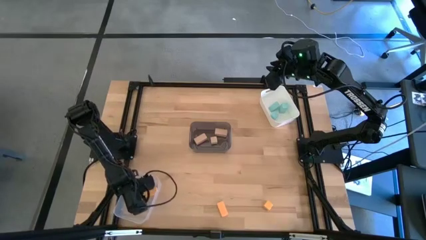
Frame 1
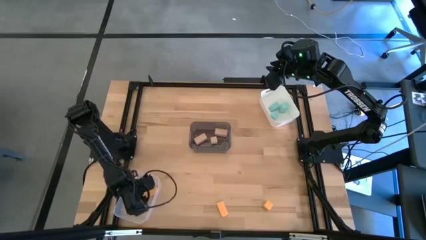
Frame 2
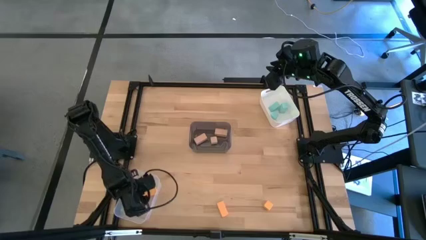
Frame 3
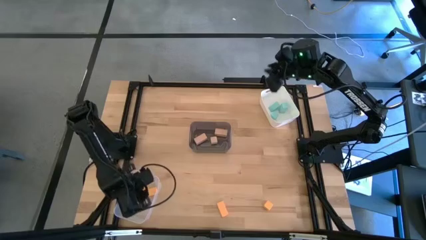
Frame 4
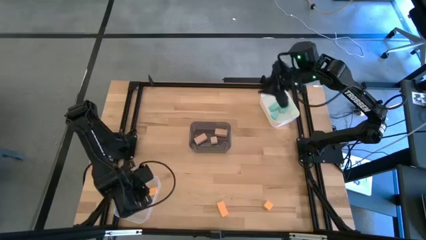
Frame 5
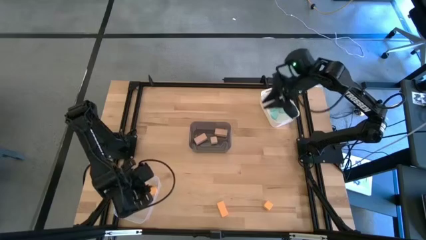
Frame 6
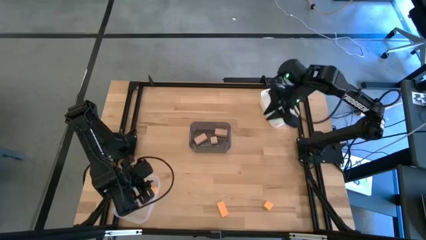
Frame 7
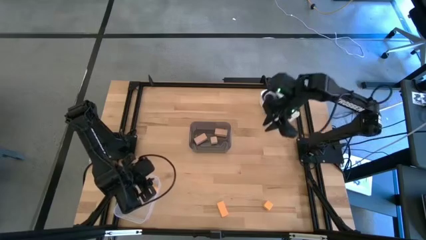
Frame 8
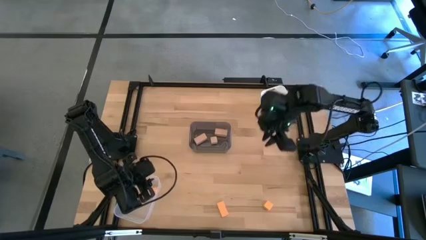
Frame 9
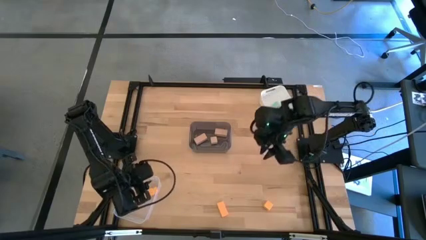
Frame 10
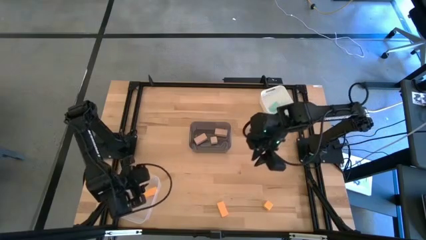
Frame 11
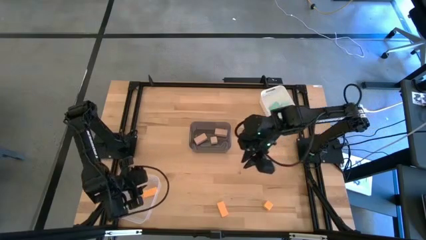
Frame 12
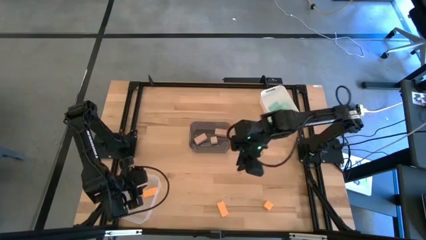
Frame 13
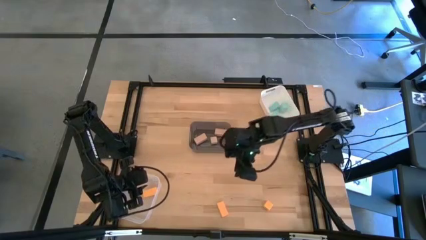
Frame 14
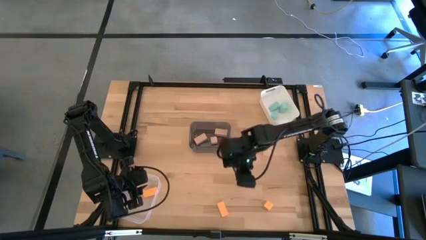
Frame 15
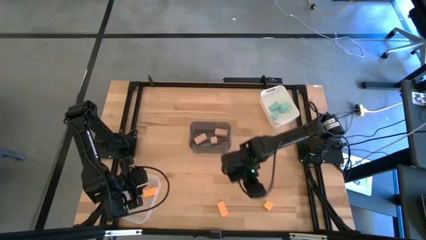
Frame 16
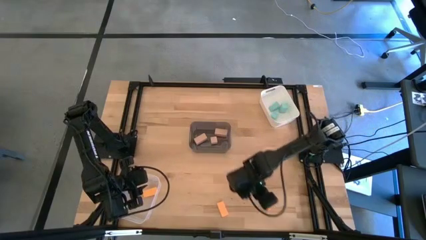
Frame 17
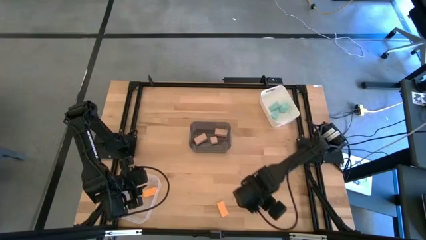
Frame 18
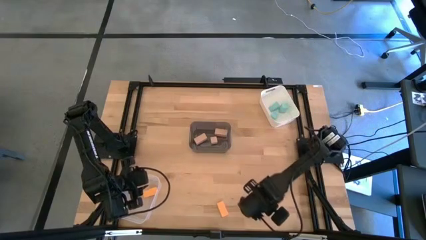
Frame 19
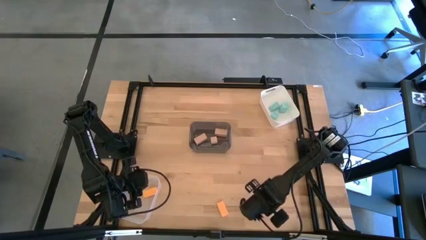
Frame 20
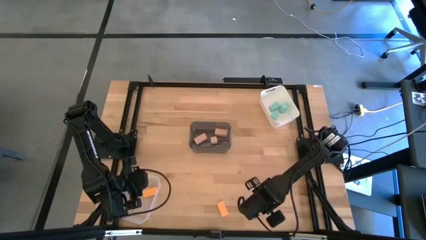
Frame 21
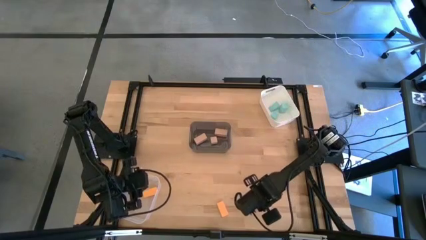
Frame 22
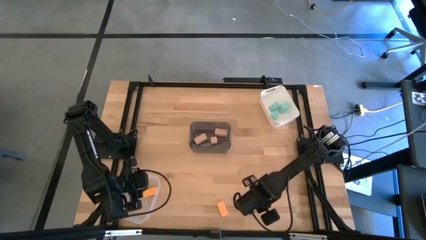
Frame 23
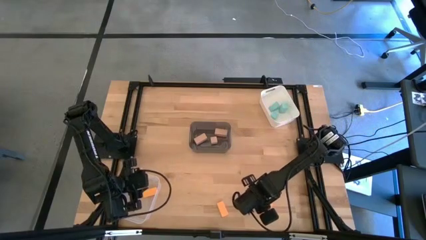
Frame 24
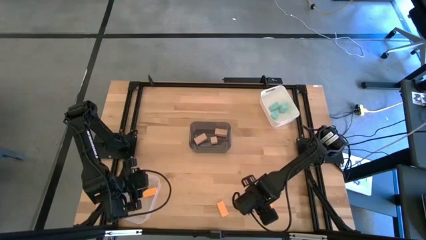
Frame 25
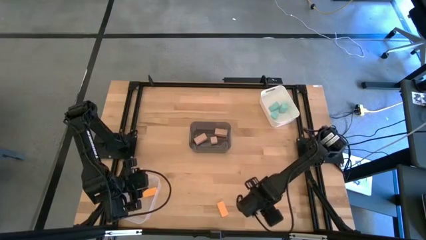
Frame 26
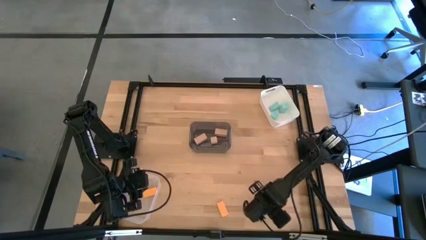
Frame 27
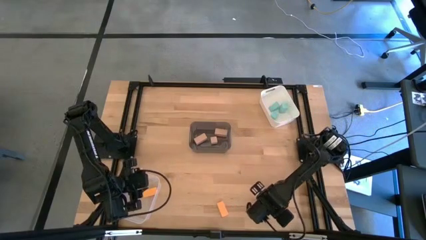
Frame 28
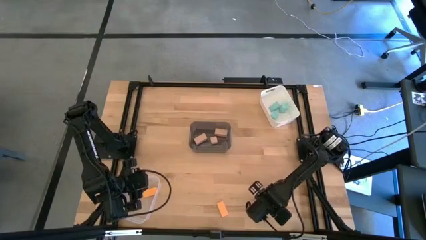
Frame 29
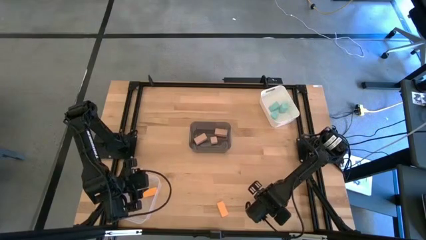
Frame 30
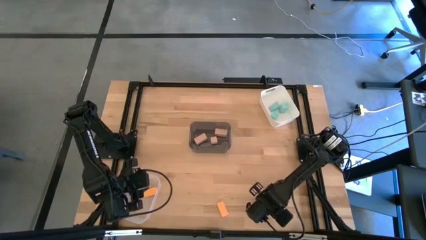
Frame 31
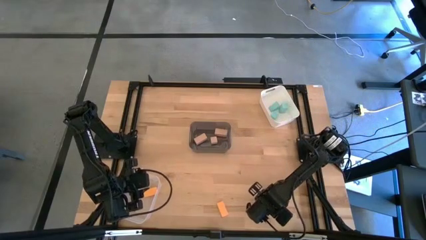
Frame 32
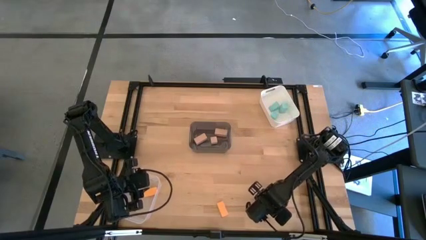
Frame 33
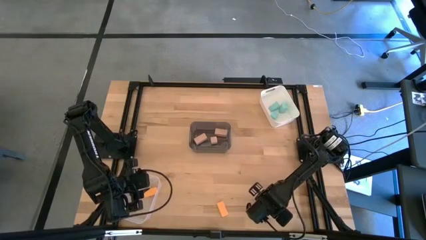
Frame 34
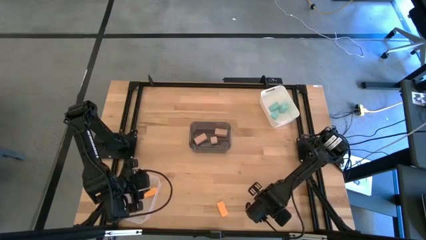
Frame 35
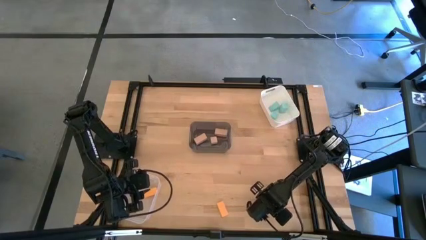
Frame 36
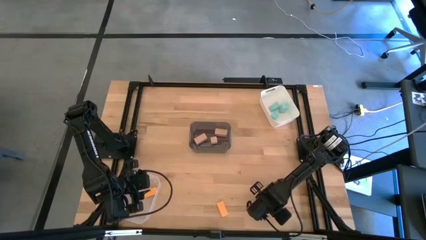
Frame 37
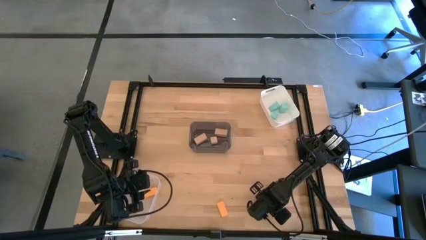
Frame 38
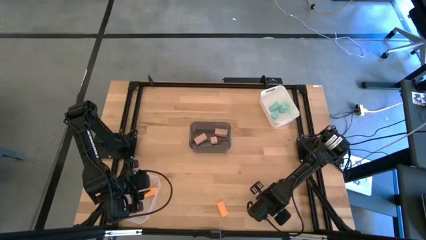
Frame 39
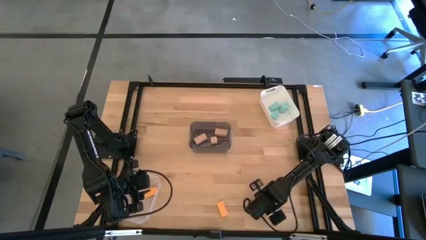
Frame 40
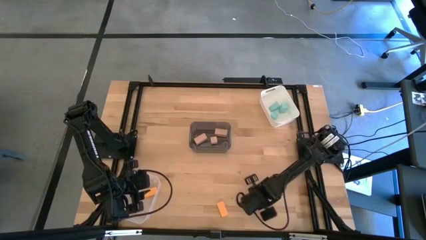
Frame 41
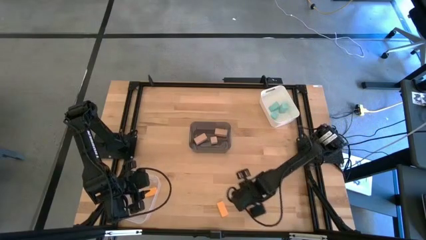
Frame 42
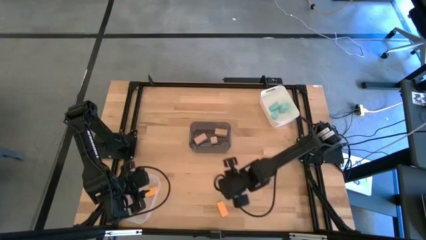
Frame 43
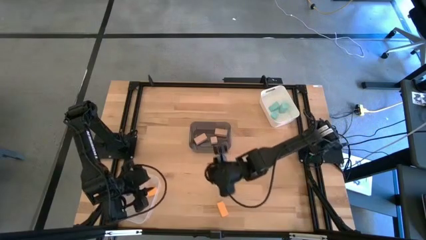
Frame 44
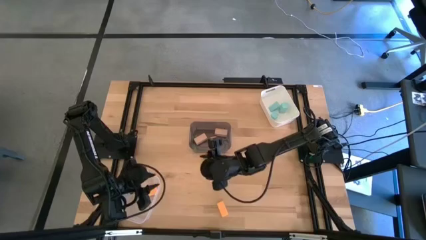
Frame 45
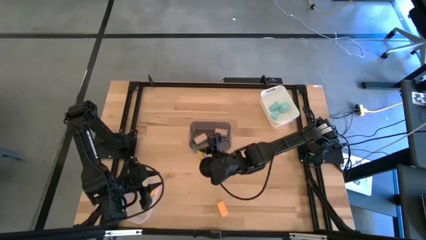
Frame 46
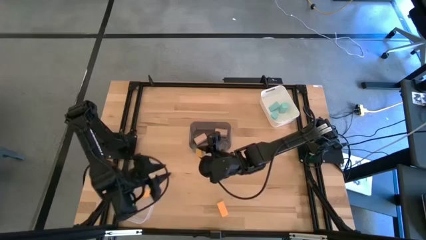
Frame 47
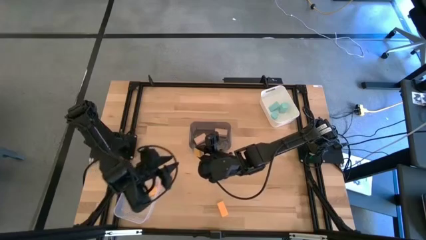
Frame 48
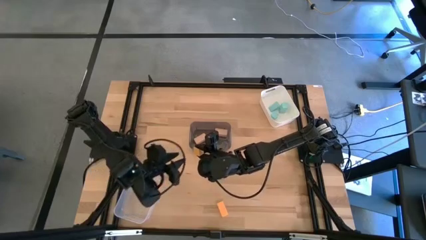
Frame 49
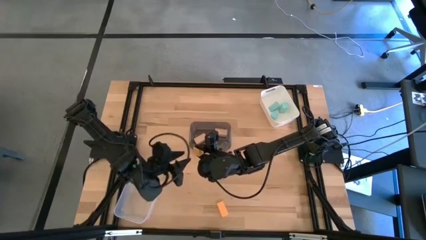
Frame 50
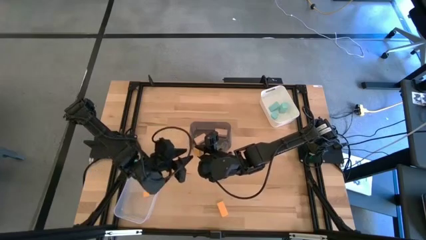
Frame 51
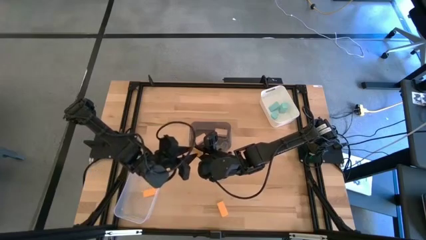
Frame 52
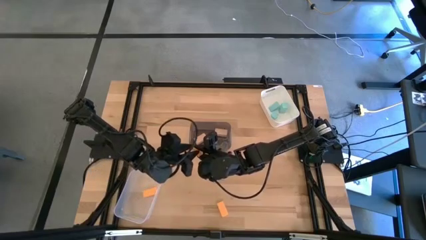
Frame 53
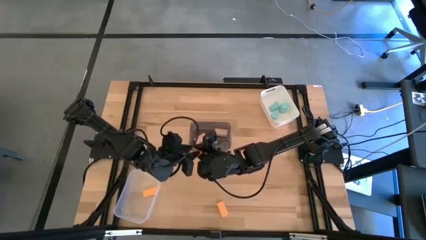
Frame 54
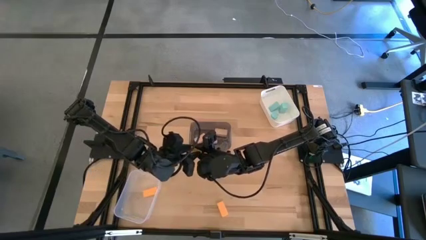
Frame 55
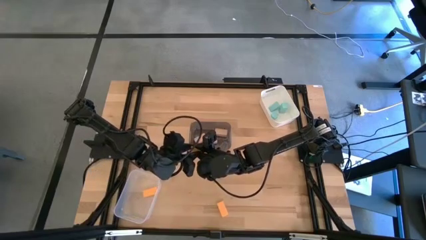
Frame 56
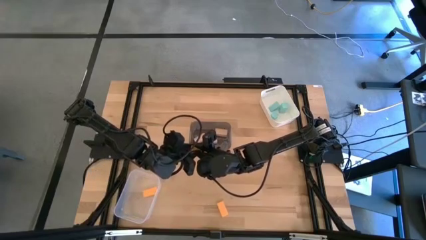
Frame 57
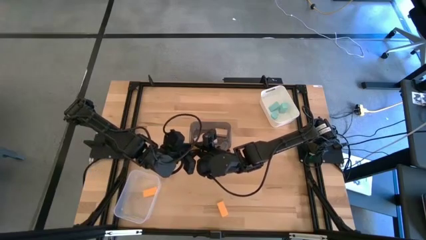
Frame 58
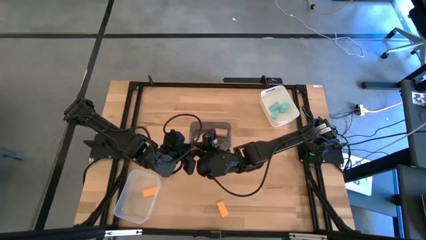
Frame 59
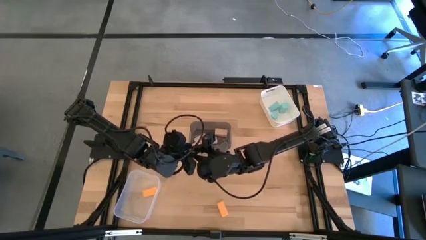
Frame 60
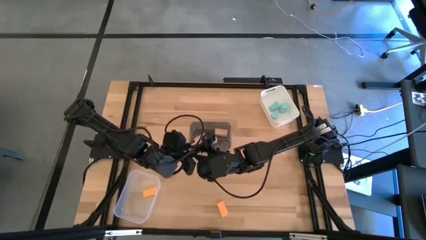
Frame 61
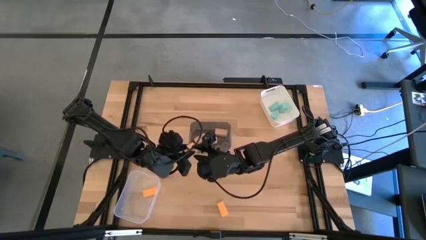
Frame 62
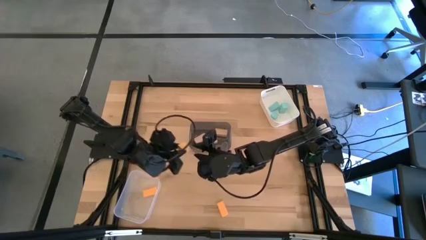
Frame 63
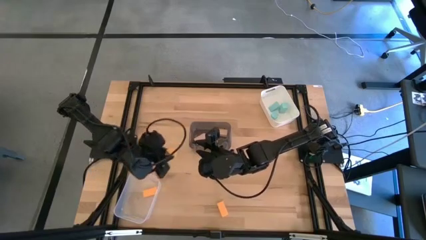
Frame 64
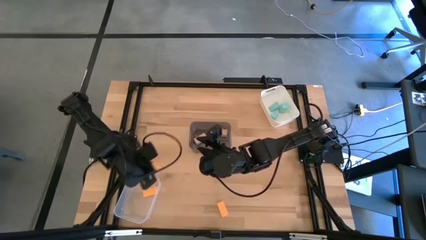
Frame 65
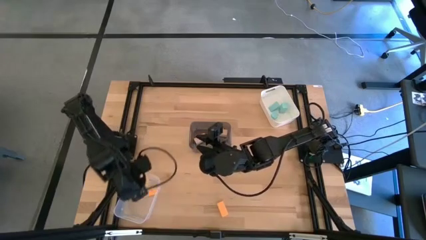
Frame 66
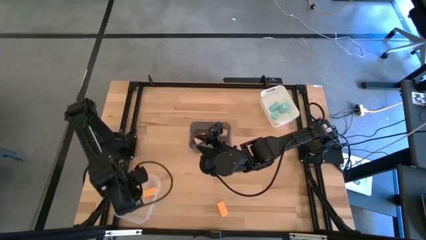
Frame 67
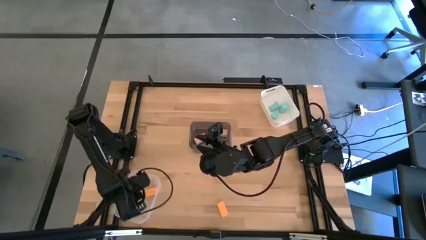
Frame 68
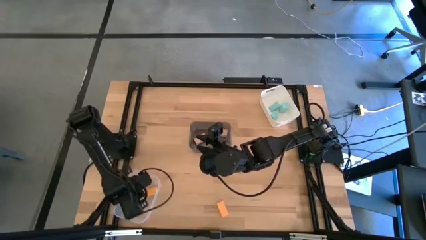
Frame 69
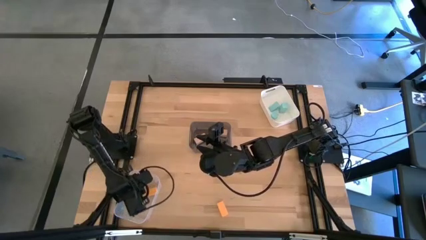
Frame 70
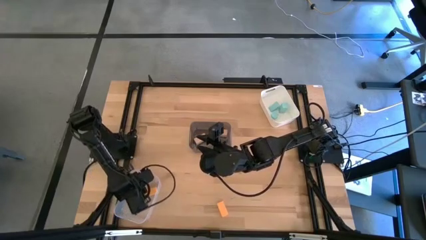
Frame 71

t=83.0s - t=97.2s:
Task: Sort & place blocks by color
Put the right yellow block into the transparent bin
